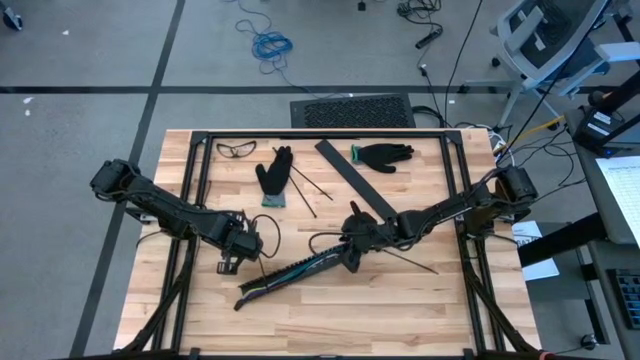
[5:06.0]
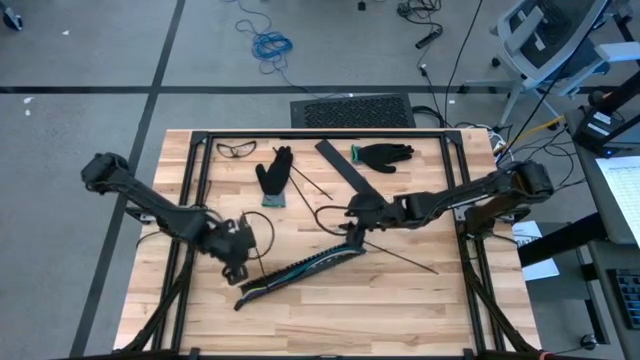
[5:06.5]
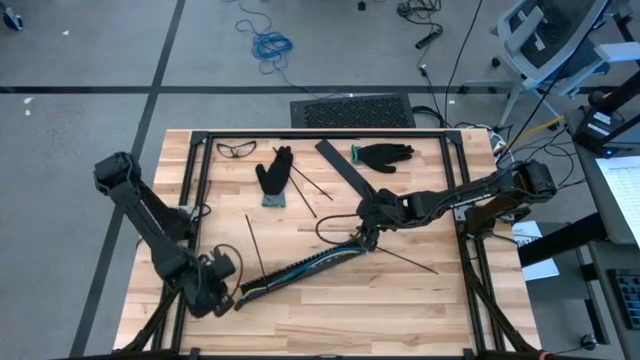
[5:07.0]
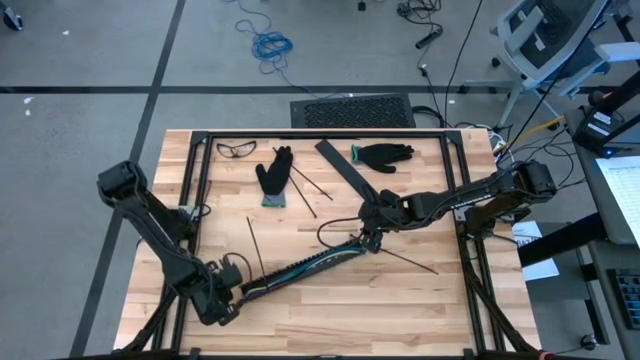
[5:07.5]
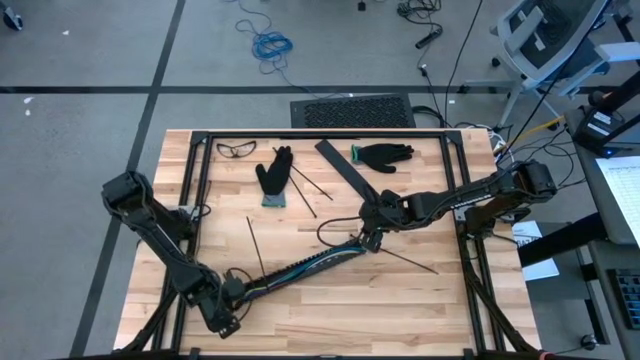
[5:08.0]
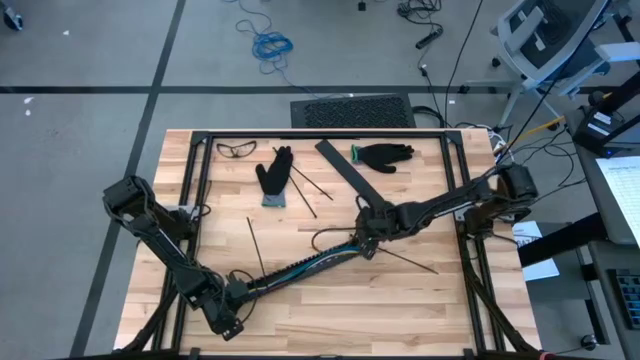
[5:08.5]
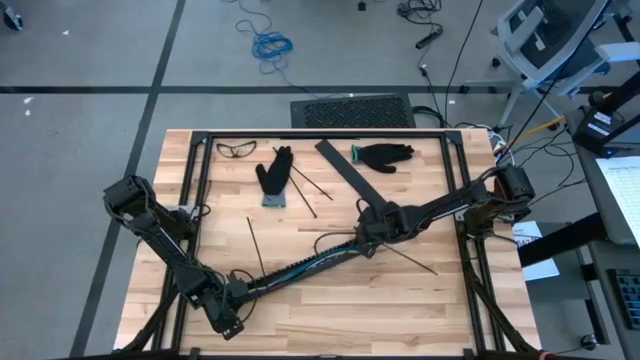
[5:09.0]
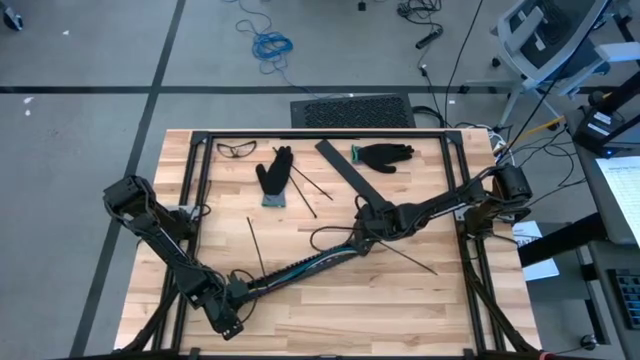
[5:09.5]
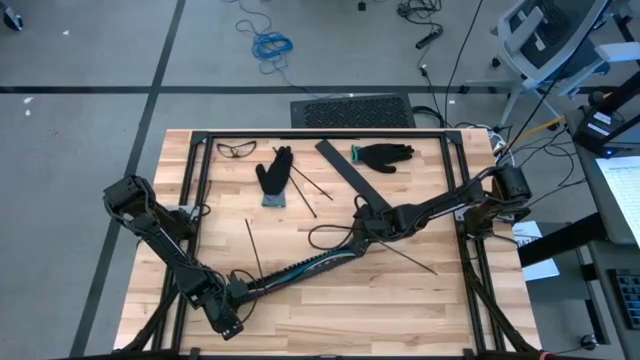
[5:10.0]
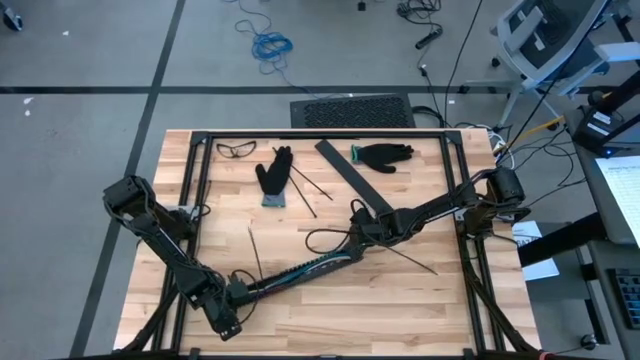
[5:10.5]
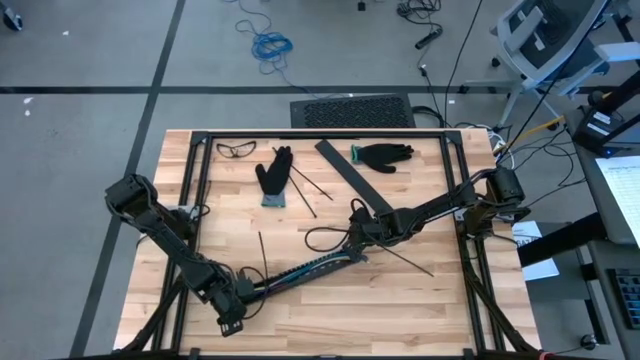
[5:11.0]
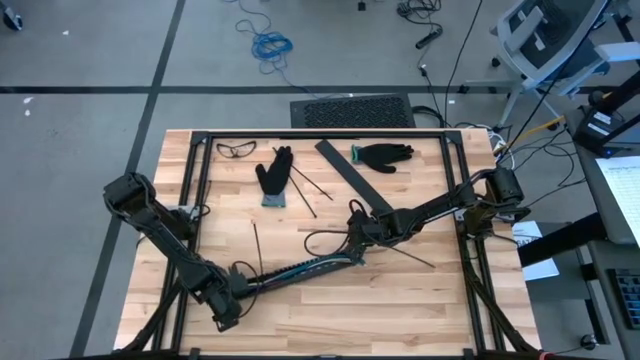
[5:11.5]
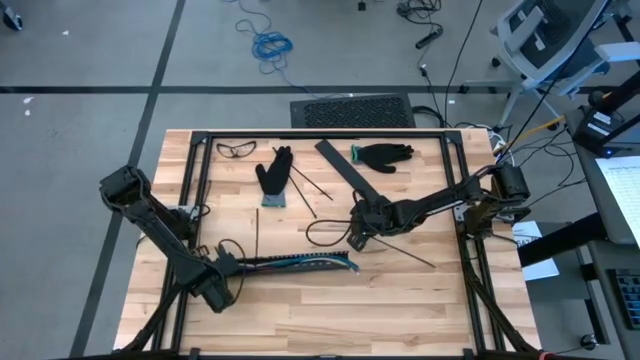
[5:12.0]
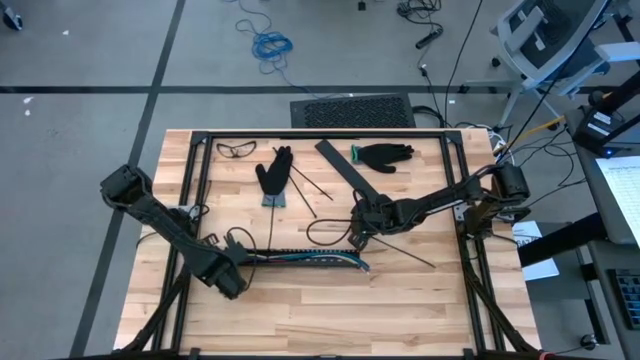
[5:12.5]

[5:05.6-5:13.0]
Task: Ziptie cables
Put the ziptied cables in the black cable duct

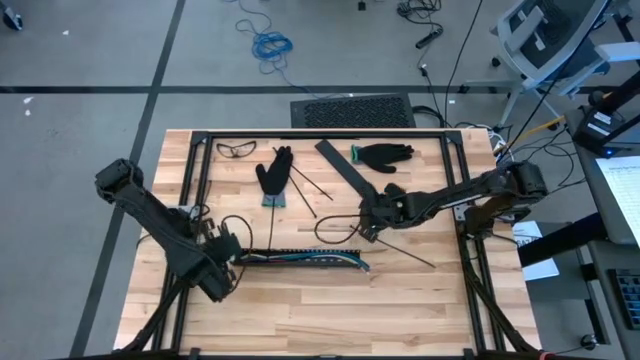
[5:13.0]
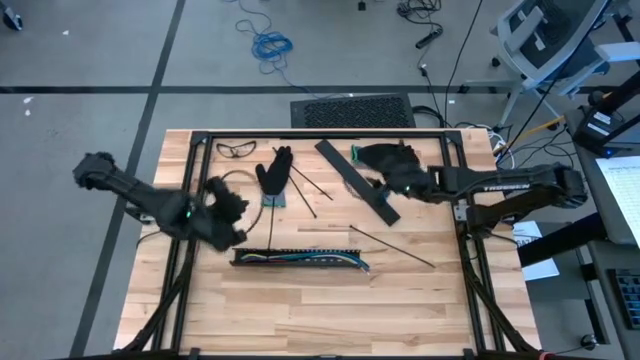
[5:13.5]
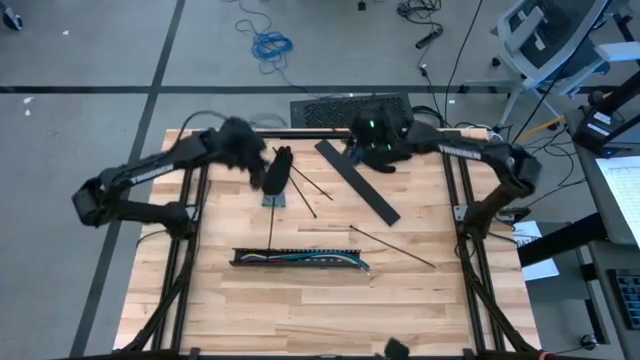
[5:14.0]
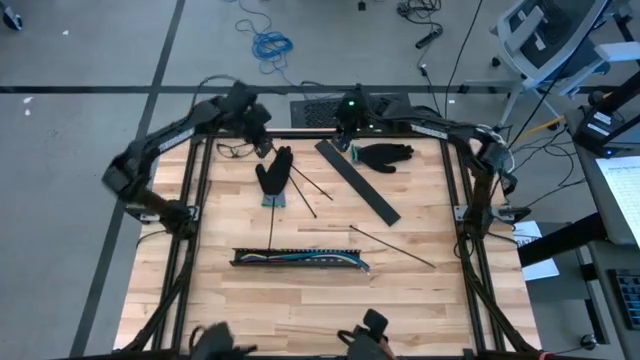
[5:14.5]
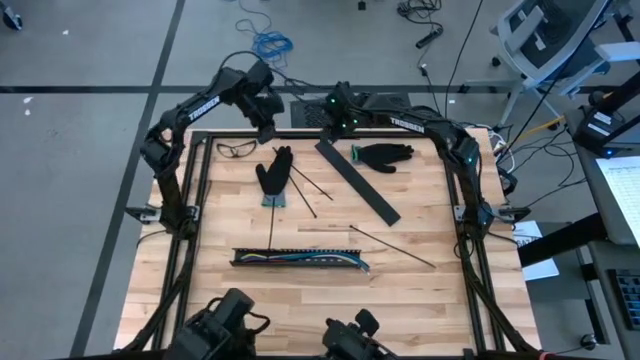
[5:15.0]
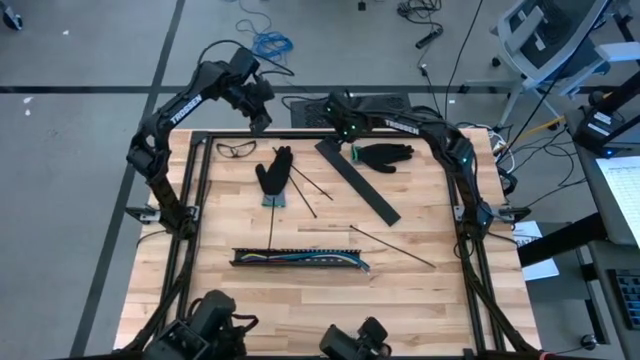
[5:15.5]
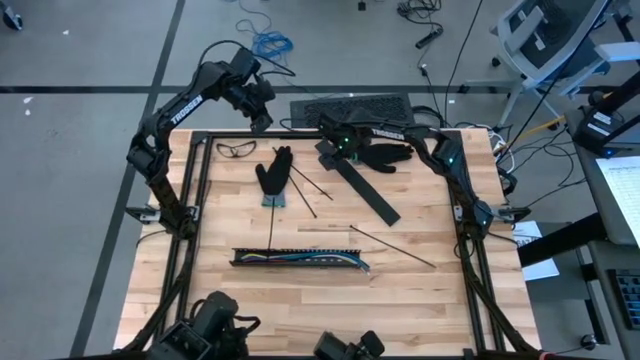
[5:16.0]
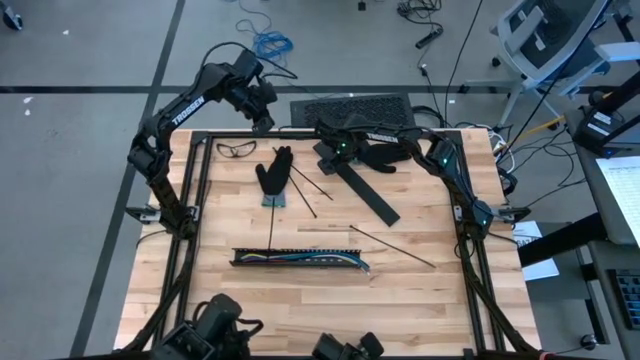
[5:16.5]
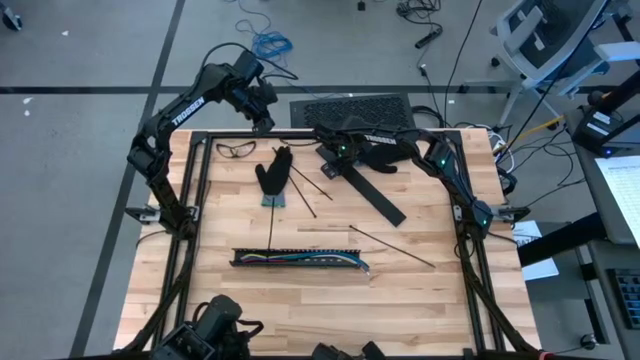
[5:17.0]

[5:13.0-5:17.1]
Insert the black cover of the black cable duct

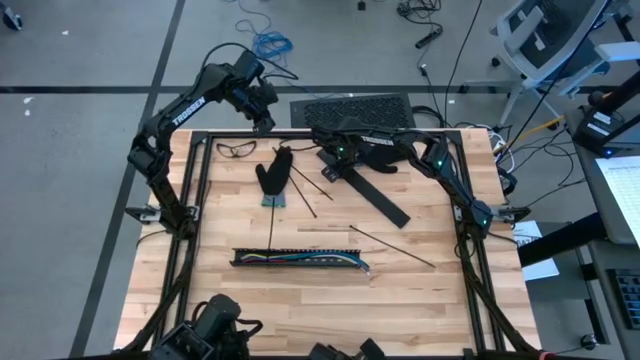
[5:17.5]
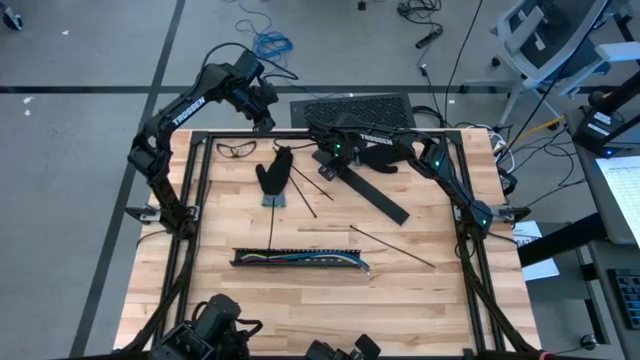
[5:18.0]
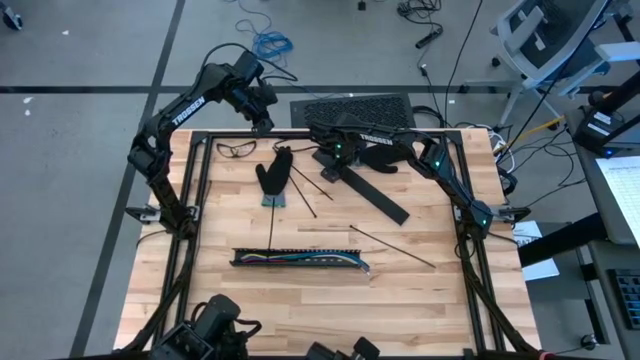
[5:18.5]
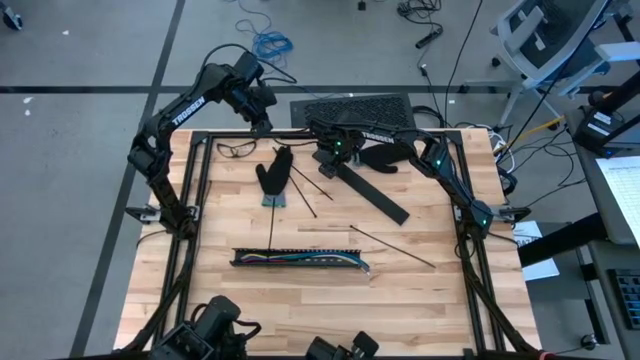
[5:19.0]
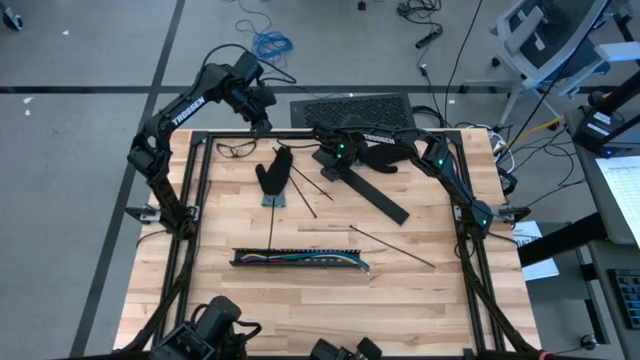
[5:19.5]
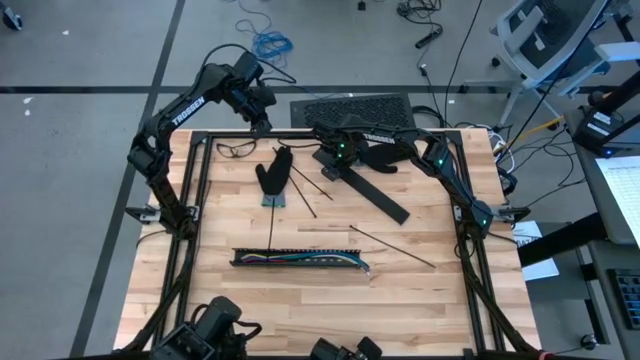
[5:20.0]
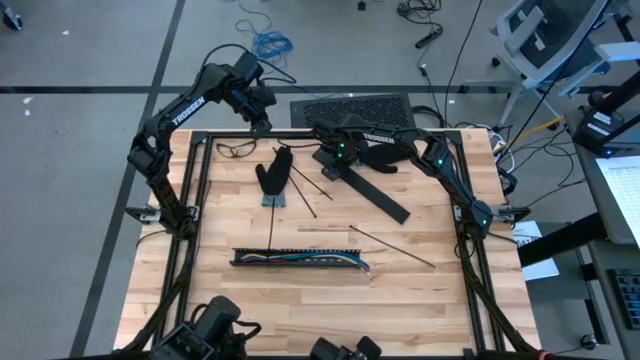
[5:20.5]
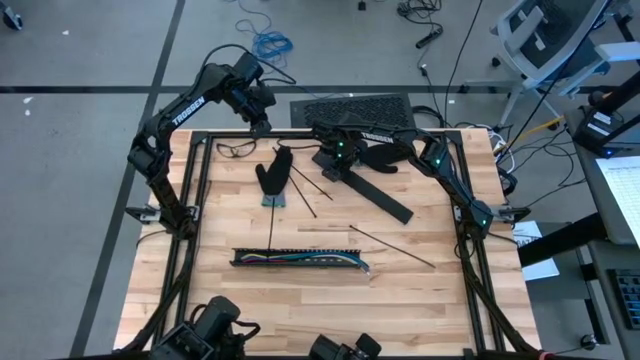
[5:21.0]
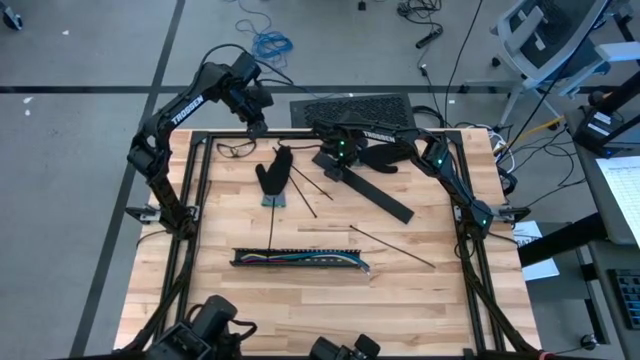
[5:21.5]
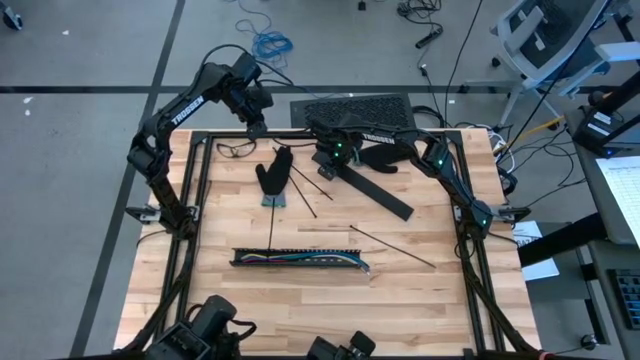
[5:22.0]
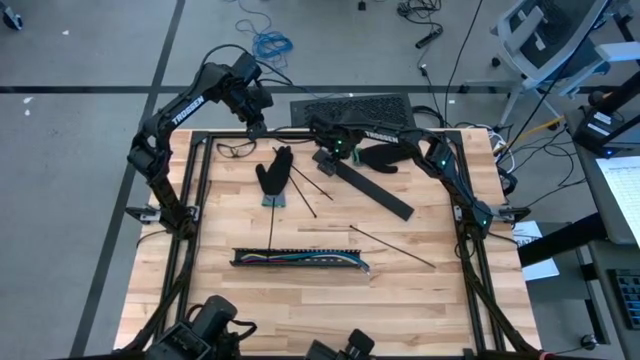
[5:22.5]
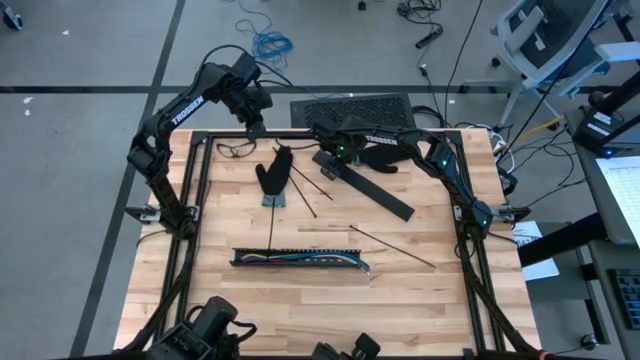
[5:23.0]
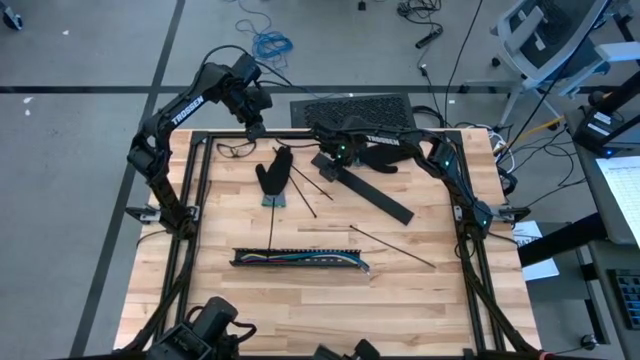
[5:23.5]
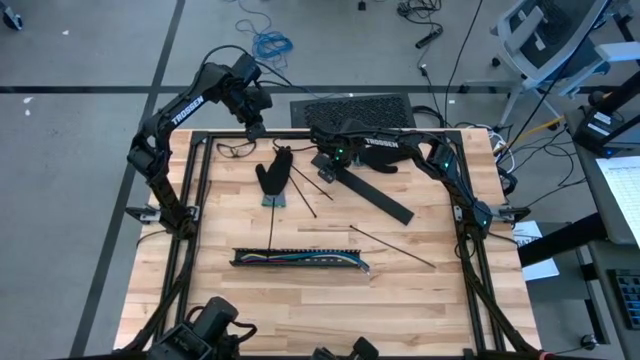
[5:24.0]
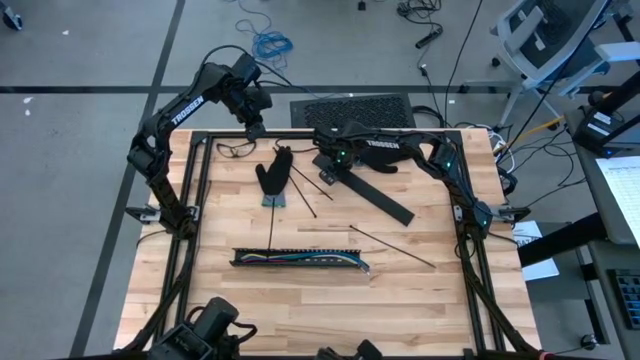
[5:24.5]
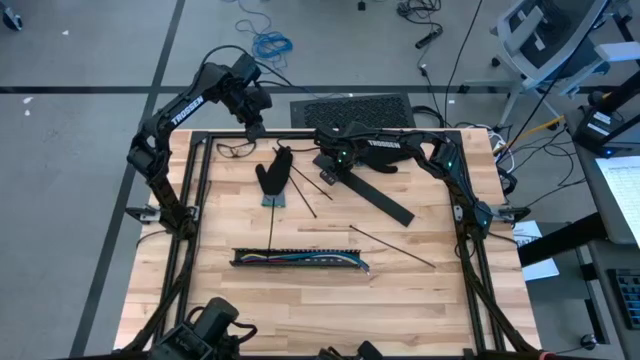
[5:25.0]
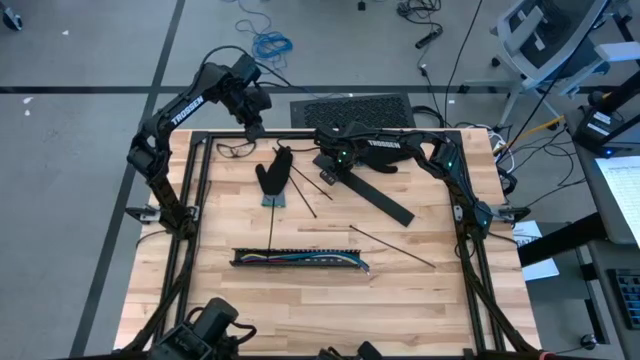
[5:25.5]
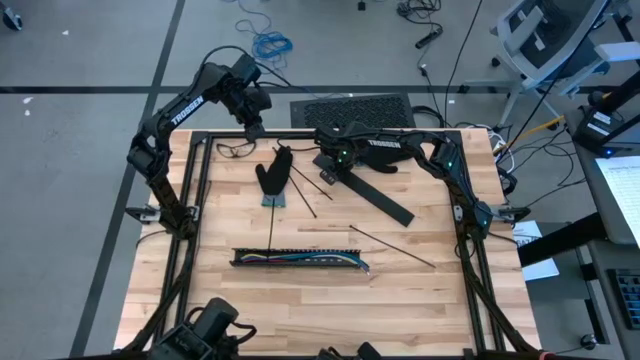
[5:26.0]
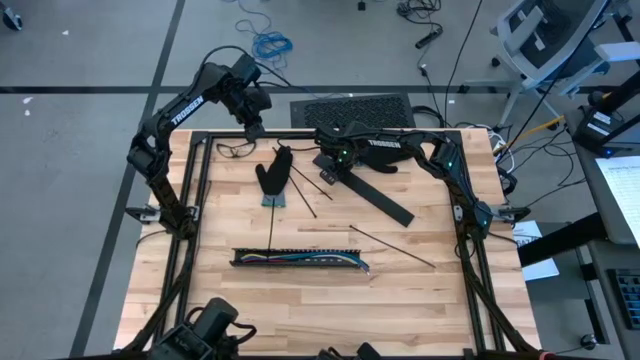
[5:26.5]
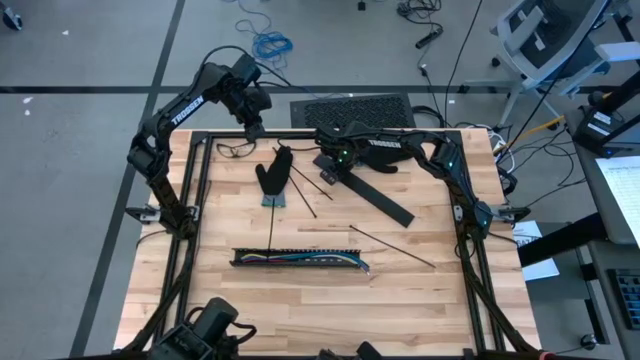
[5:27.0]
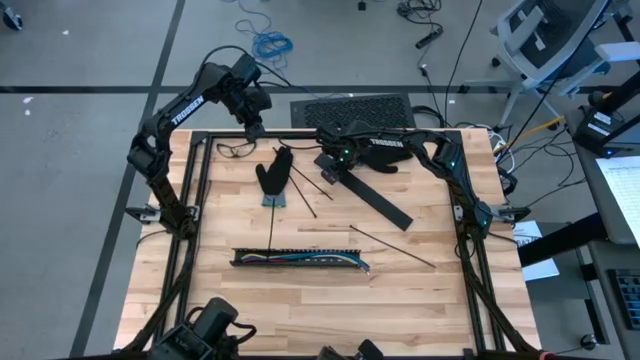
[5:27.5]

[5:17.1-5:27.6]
Insert the black cover of the black cable duct
